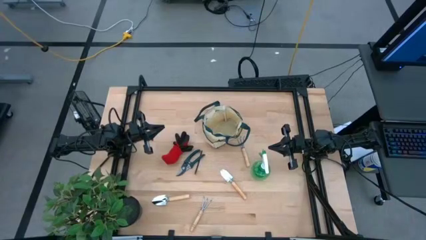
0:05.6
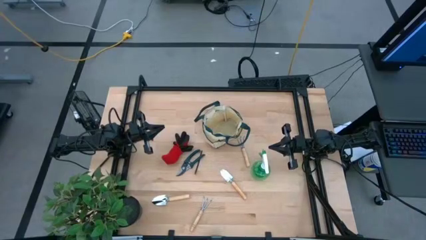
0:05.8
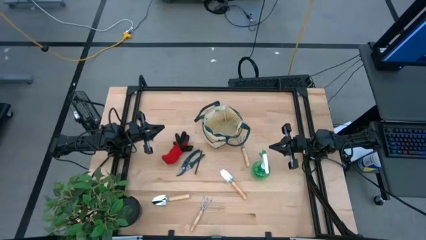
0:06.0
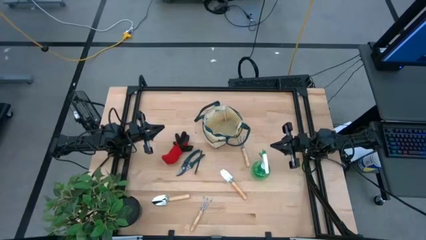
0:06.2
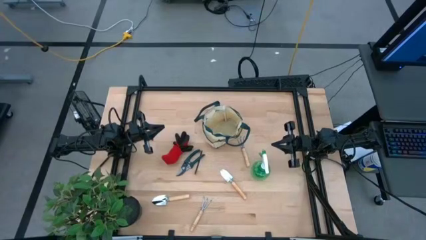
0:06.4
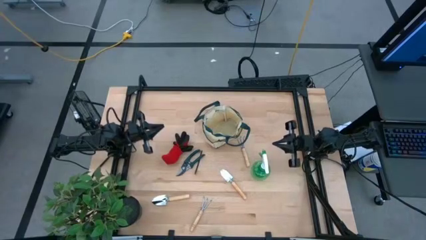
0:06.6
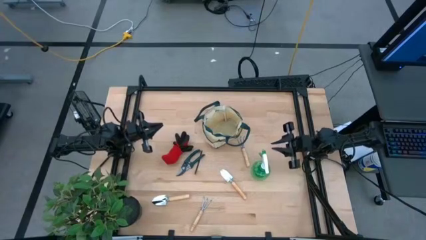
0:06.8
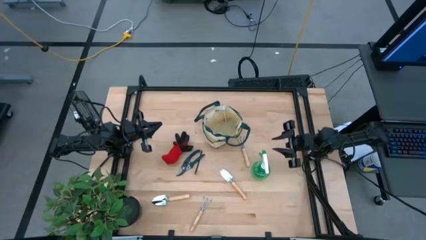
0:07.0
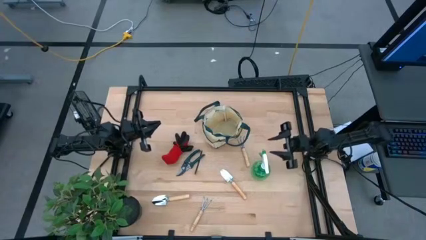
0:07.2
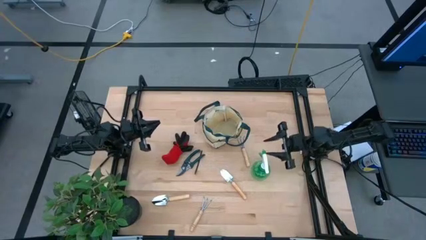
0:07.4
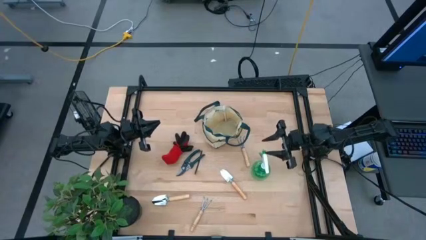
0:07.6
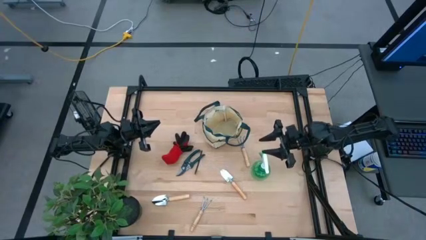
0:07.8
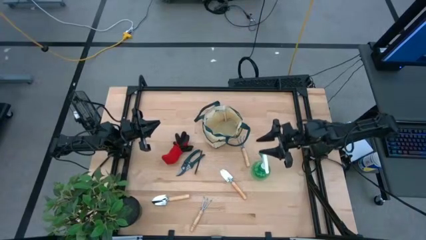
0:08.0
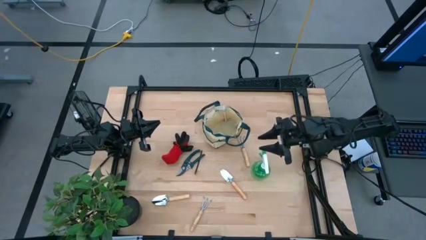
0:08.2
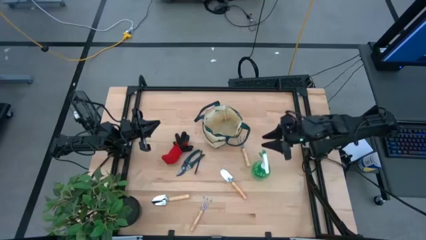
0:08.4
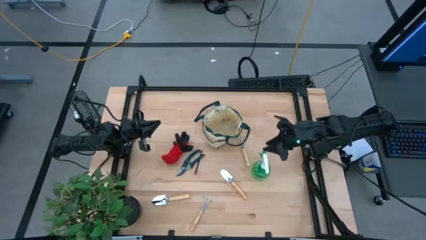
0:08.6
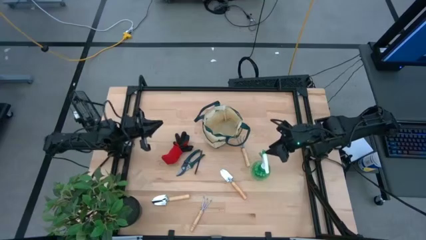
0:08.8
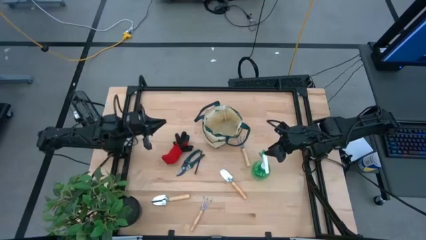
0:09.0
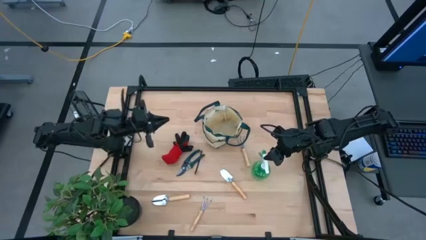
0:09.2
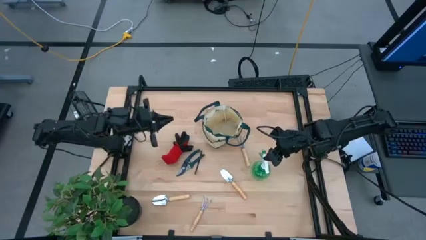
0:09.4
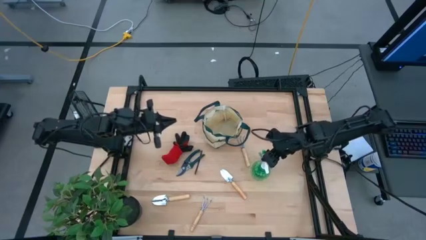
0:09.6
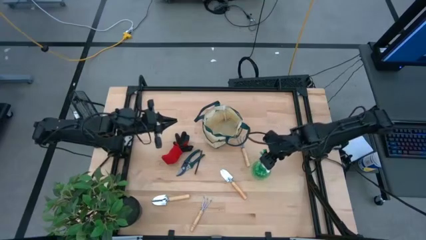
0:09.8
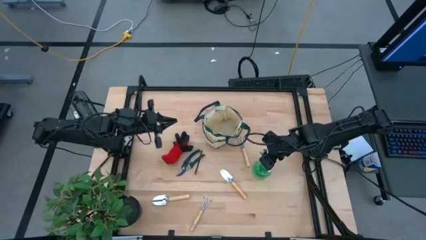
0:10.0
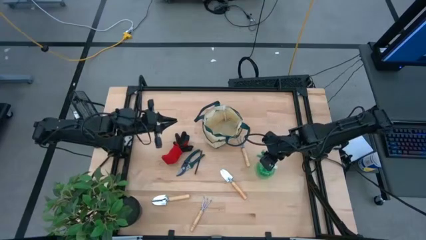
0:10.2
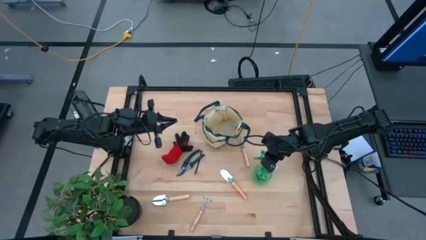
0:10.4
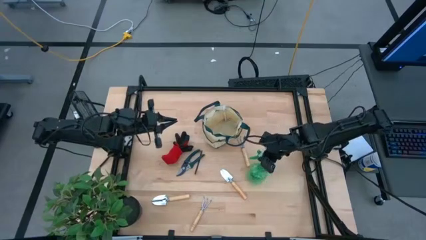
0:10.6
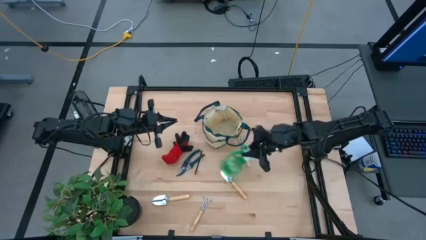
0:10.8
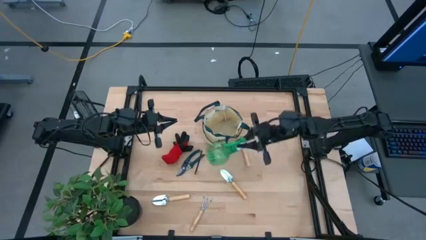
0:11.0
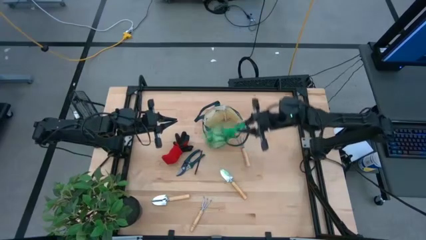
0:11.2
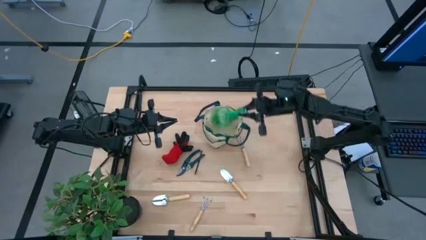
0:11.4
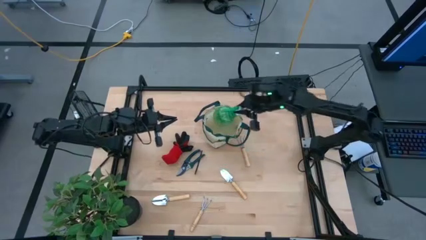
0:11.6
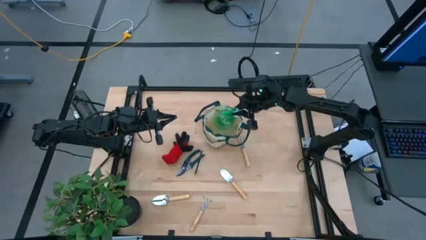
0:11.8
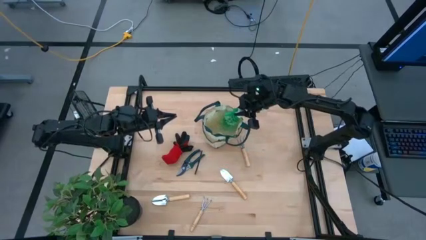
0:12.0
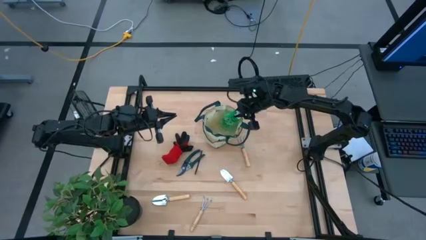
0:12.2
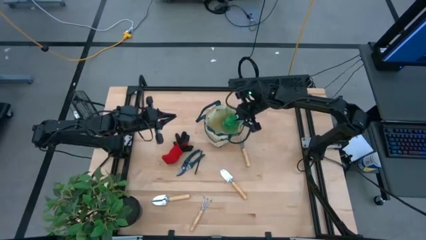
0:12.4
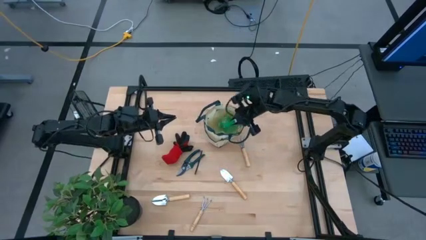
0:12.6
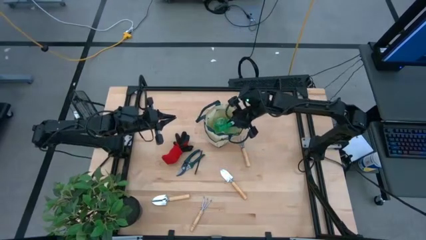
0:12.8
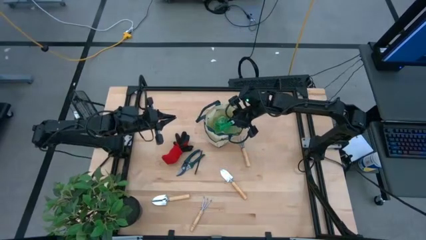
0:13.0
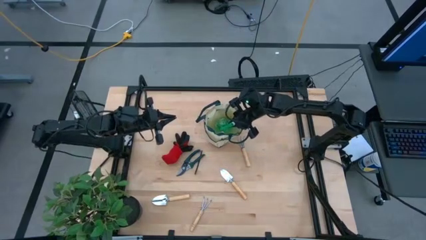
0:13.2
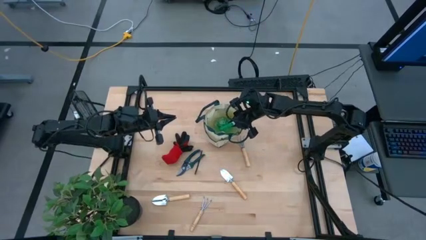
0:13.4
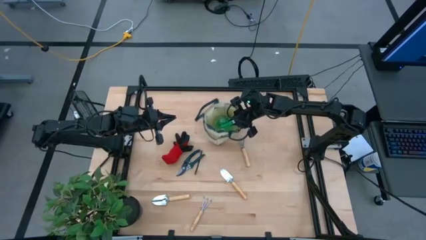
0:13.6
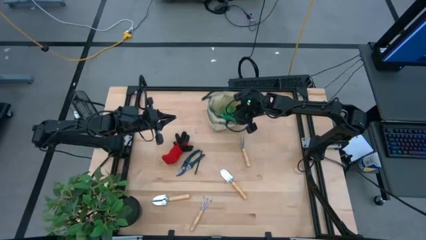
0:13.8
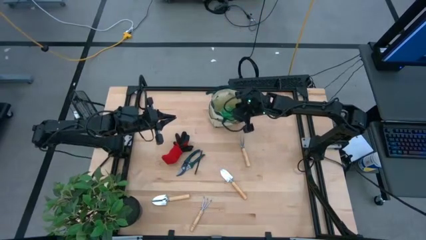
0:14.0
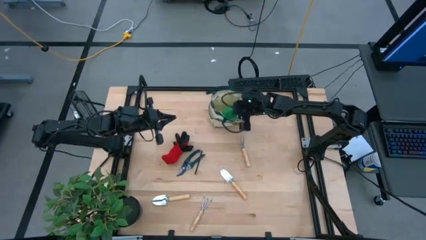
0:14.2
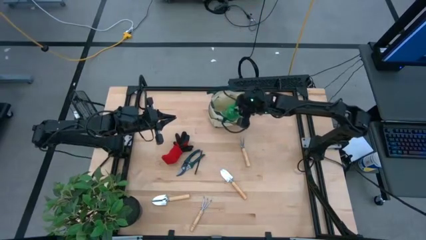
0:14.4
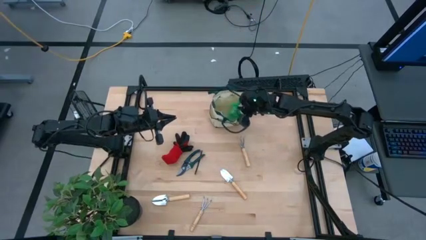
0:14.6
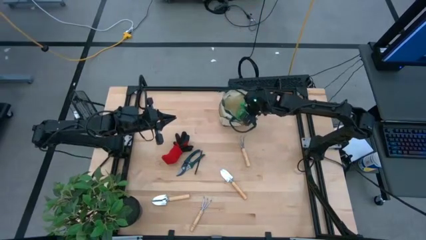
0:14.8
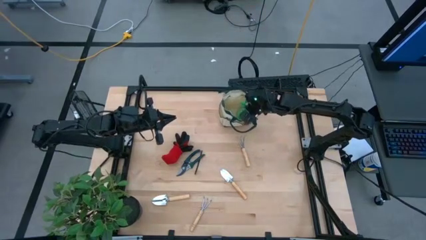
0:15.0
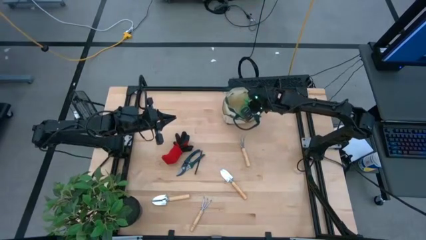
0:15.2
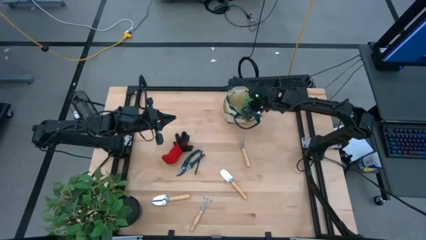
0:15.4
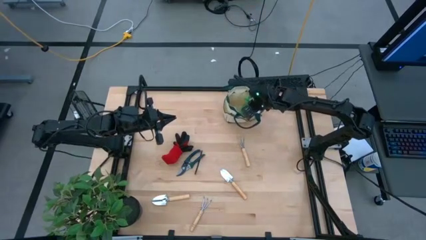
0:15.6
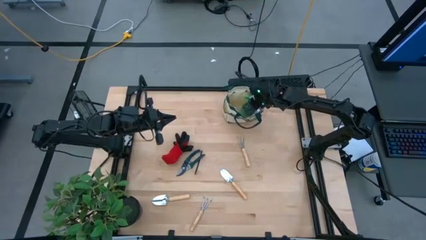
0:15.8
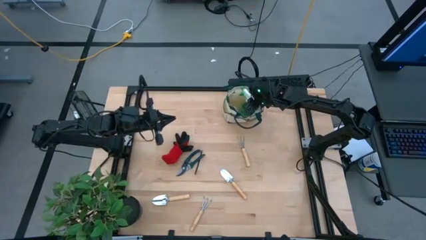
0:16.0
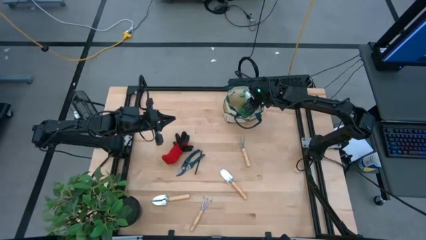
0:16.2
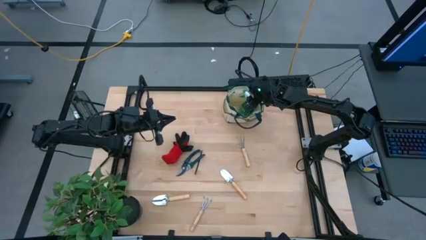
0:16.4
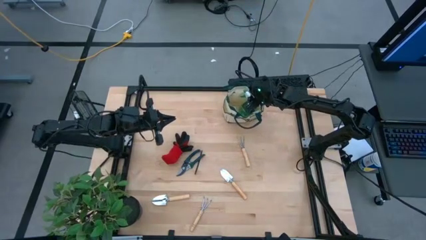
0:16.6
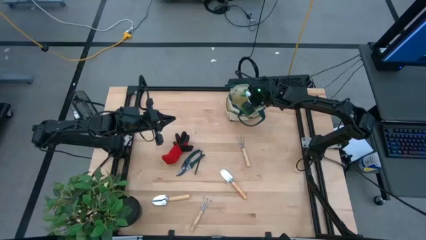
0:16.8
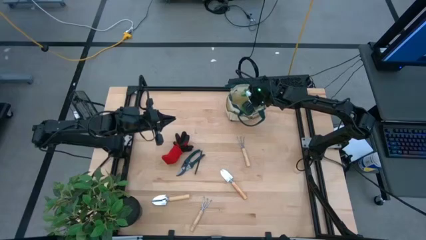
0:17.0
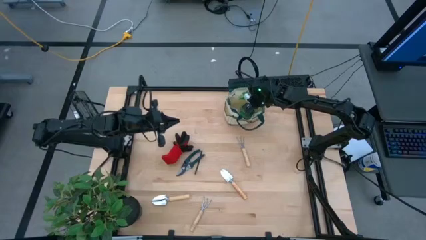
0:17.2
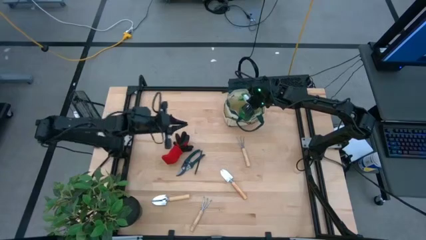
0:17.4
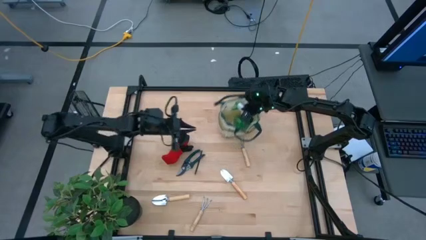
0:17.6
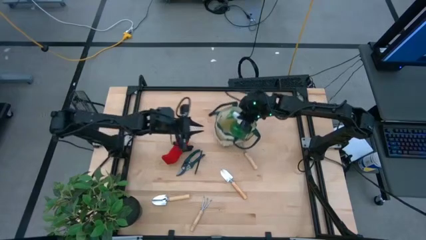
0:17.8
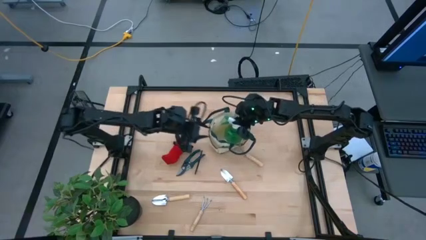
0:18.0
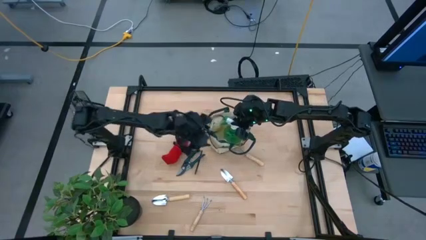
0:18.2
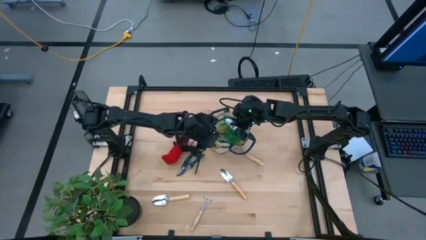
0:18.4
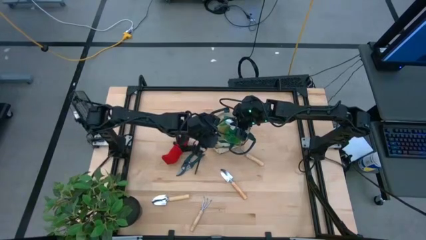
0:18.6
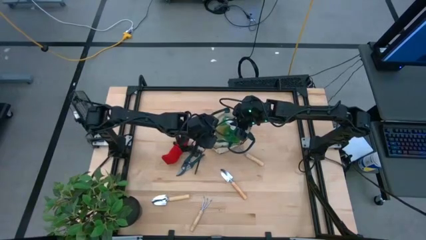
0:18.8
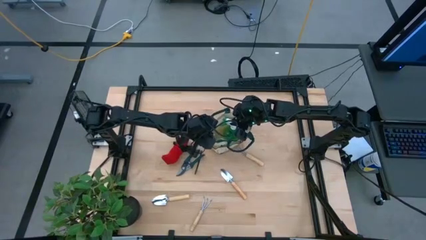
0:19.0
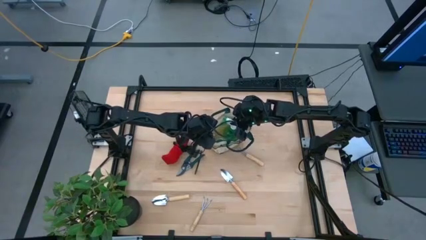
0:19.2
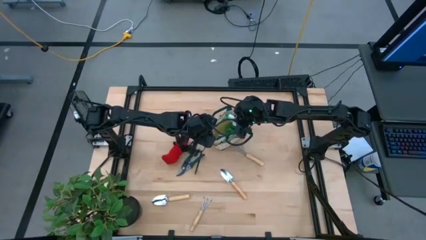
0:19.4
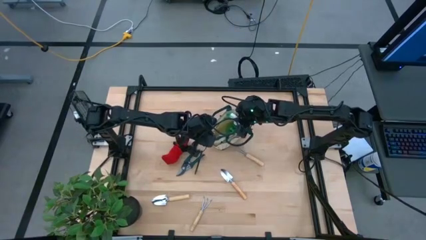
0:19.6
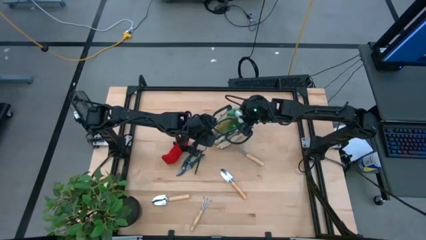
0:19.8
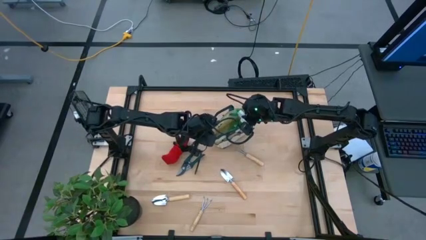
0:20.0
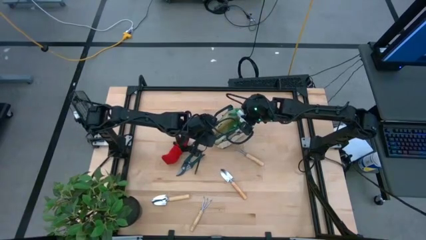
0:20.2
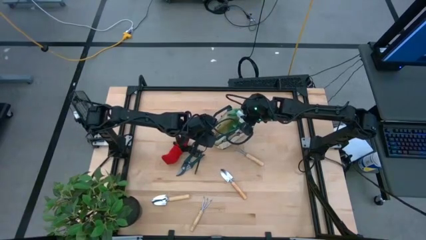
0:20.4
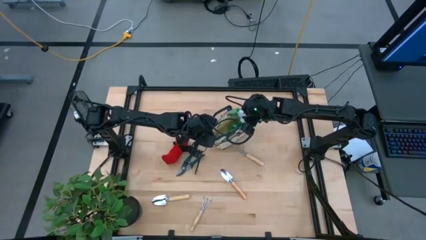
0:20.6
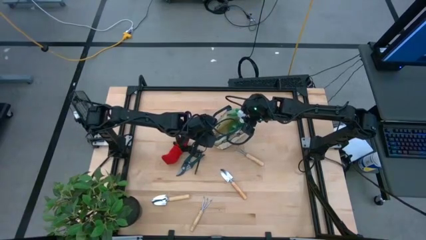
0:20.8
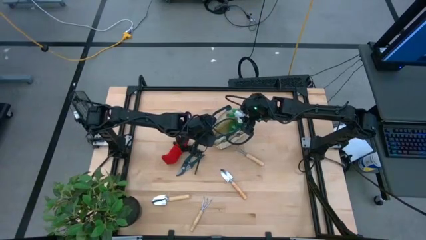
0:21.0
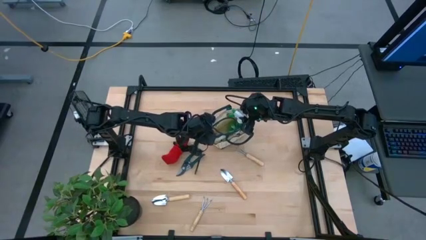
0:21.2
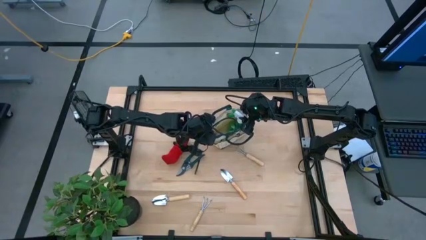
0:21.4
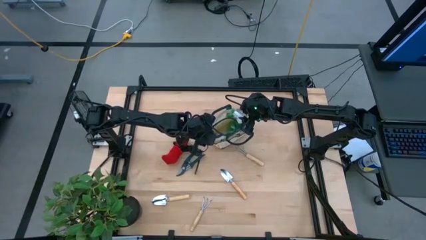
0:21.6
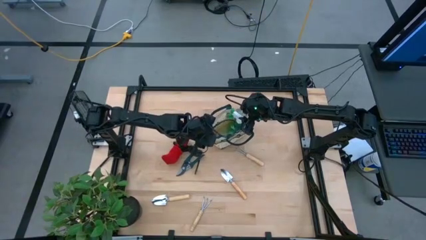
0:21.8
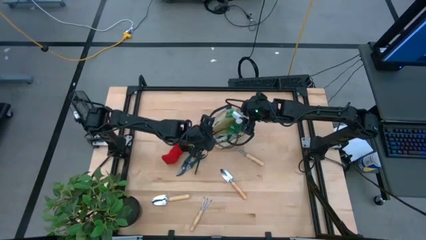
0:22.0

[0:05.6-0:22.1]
Task: Pick & Place Garden tools in Gardening bag
Put the green spray bottle into the gardening bag
